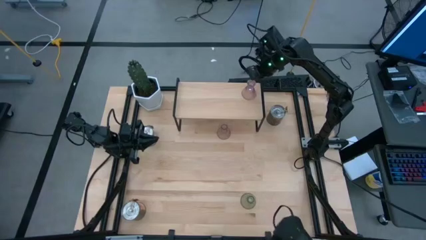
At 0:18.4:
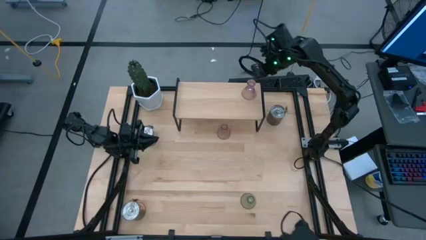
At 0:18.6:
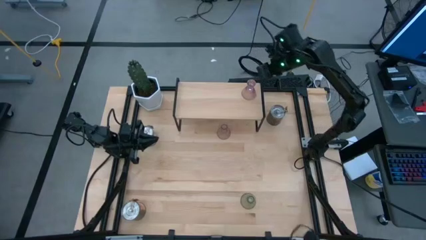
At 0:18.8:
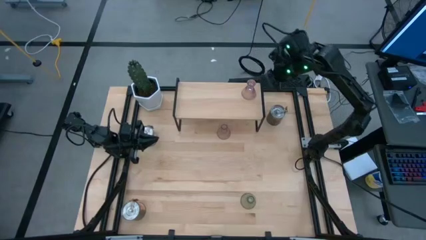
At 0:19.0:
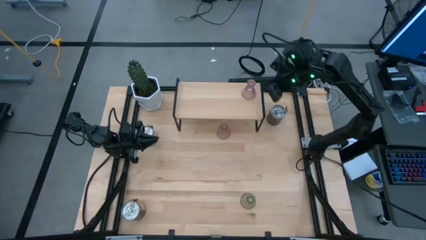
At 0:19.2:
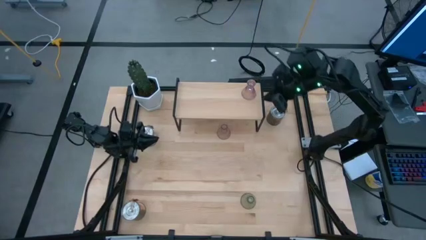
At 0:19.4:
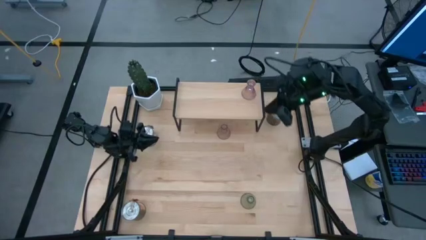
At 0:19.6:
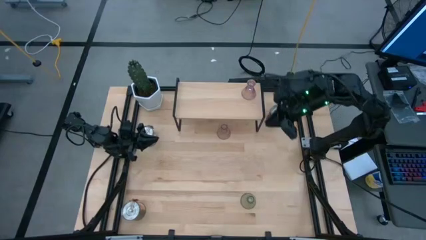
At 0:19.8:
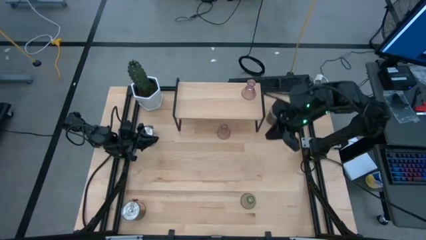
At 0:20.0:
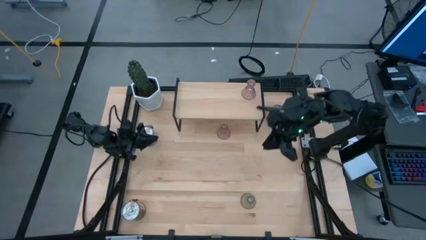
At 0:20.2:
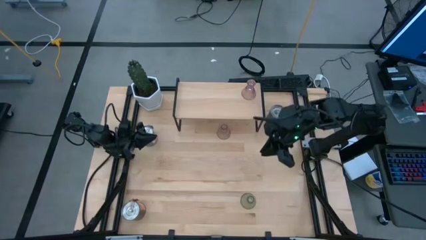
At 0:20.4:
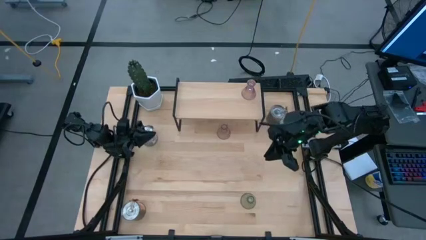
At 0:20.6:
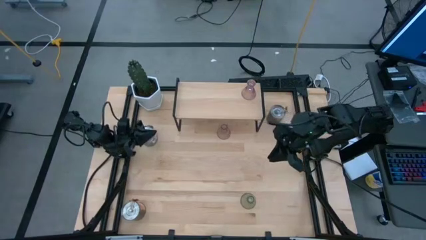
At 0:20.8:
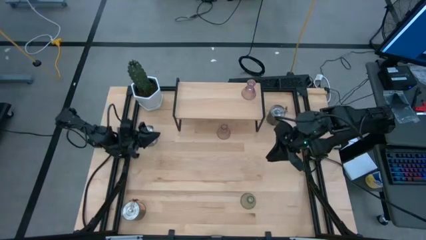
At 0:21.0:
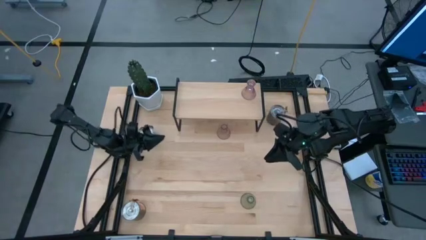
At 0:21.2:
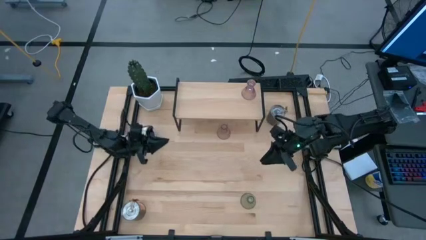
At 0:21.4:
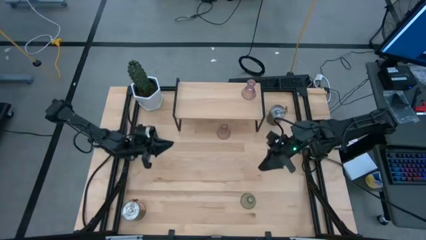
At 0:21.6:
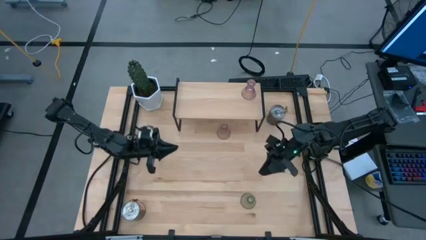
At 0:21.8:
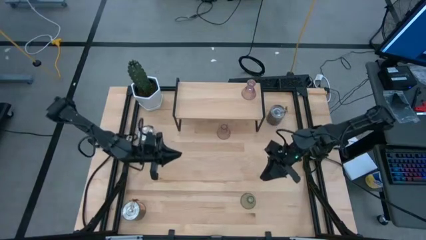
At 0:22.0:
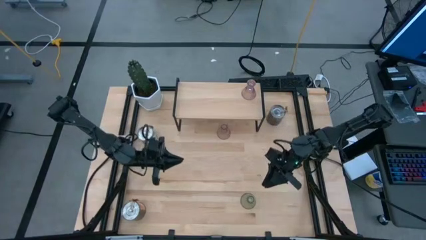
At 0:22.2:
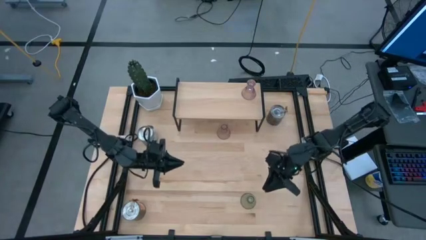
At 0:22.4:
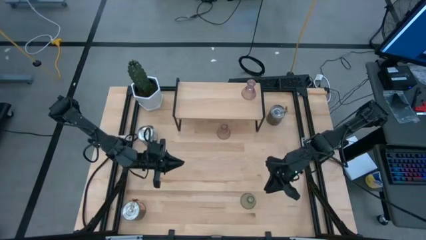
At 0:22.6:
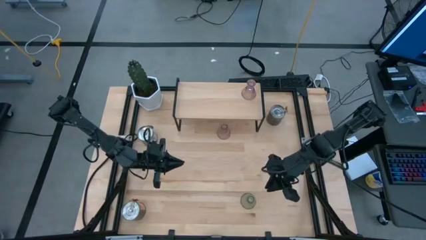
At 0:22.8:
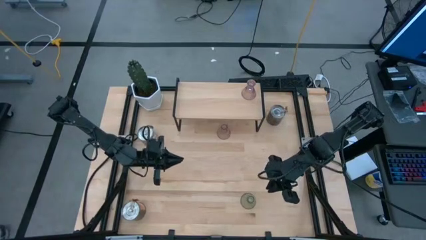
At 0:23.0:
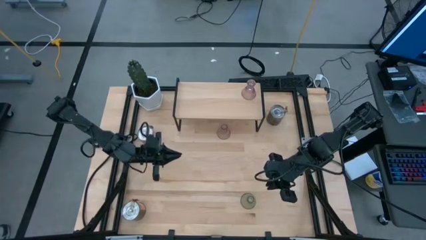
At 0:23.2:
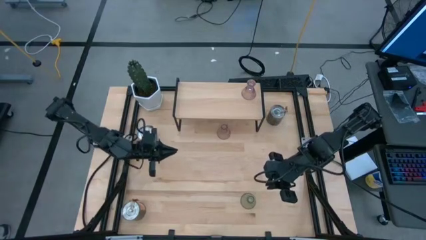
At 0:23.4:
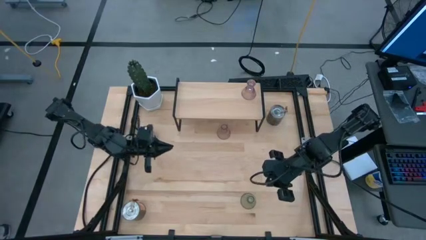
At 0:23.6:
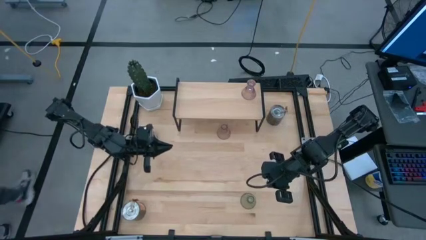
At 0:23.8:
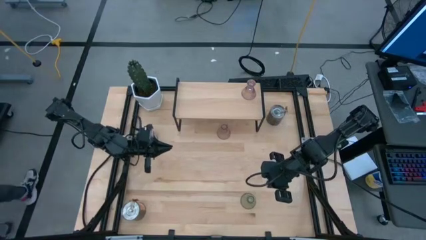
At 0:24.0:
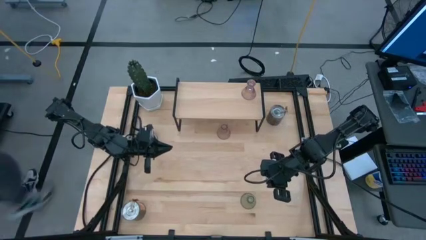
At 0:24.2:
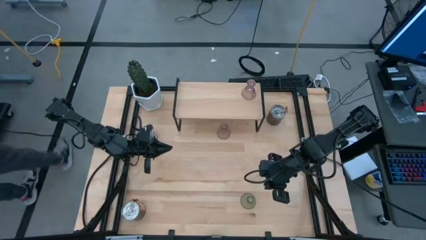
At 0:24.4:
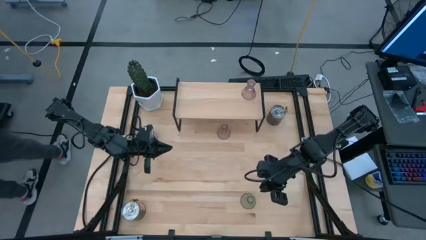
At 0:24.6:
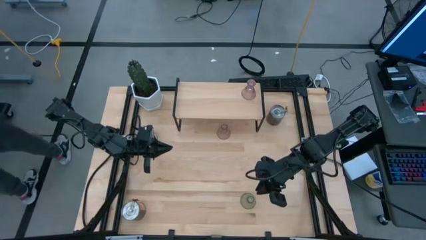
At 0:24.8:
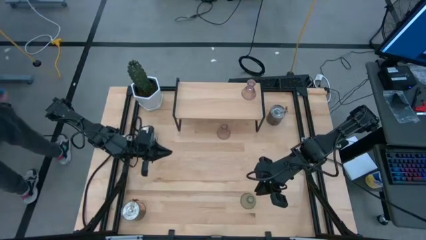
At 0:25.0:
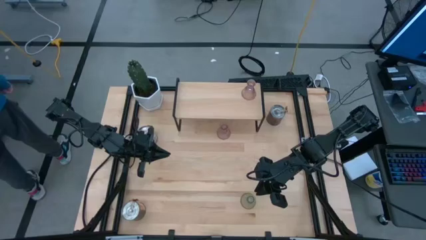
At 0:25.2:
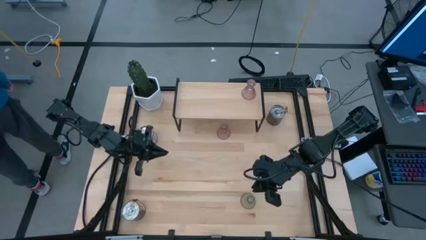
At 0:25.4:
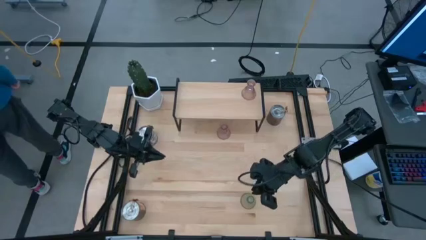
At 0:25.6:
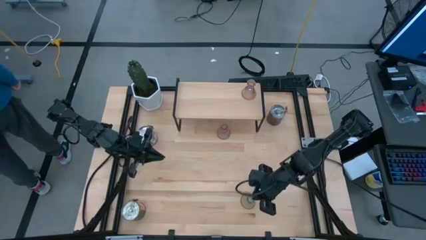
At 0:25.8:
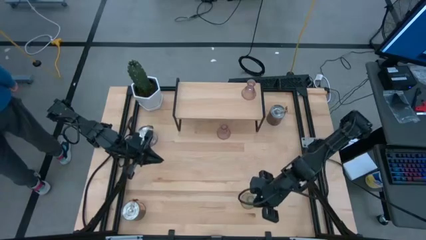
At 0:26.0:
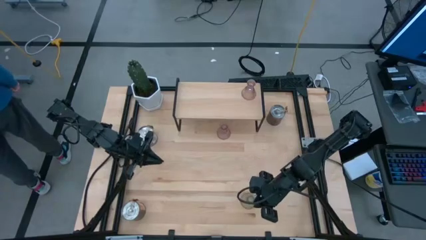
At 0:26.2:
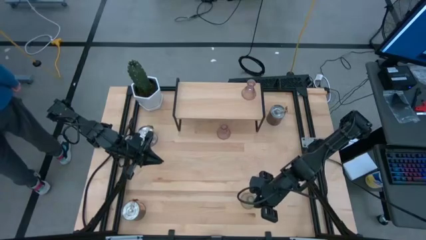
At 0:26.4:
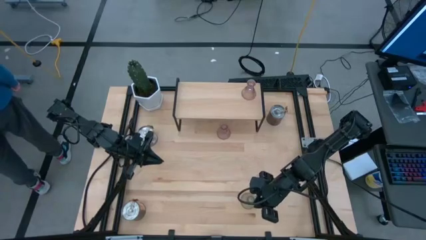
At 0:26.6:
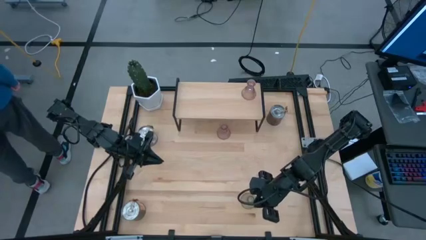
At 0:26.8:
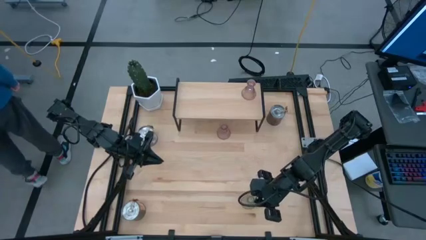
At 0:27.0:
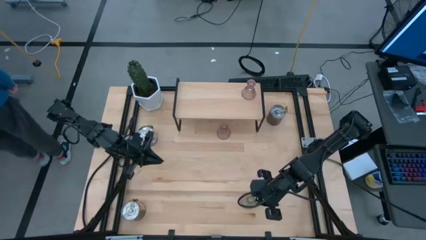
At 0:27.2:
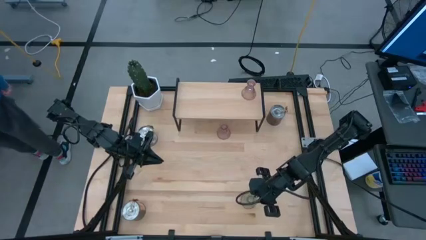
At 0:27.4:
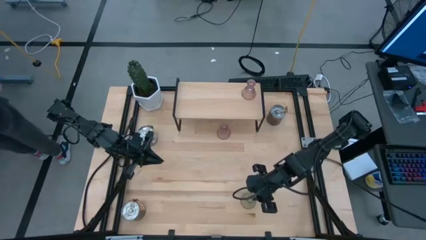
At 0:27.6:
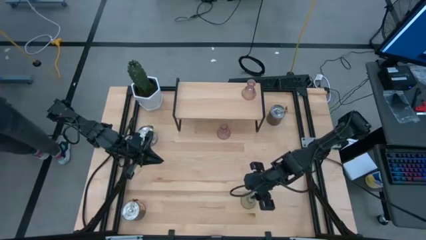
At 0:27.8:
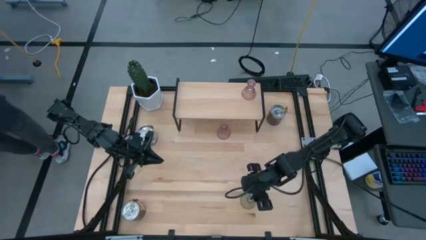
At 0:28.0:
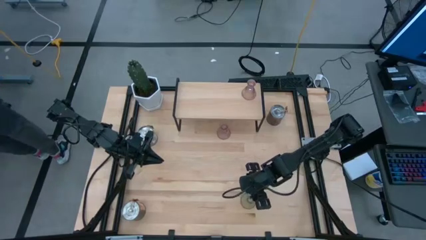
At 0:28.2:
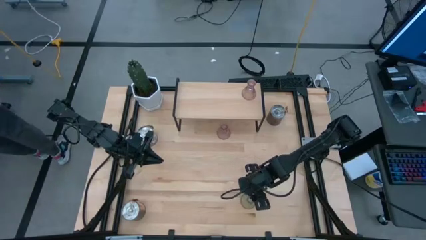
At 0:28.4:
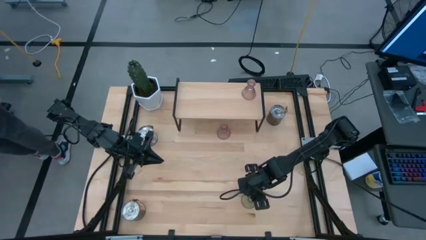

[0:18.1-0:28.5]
Task: Pick & Place candle stick holders
Put the green scented candle on the shelf
